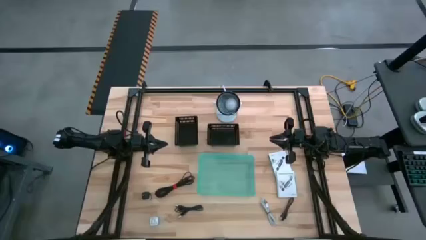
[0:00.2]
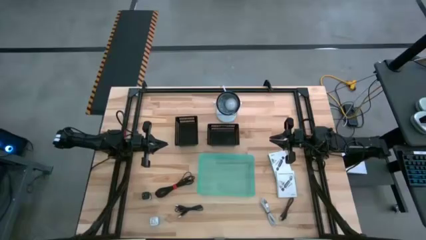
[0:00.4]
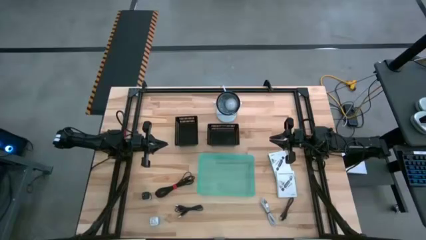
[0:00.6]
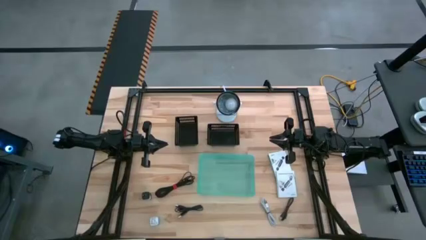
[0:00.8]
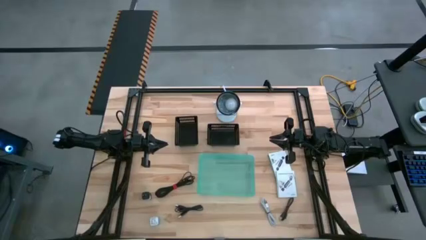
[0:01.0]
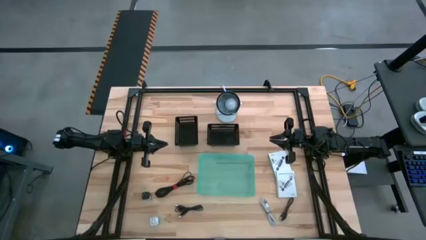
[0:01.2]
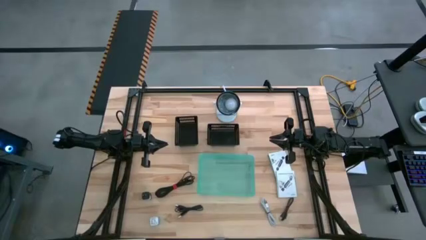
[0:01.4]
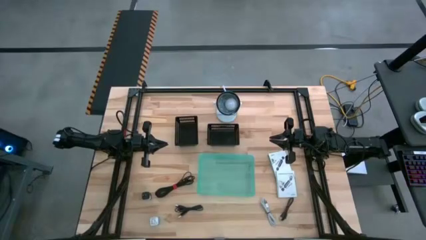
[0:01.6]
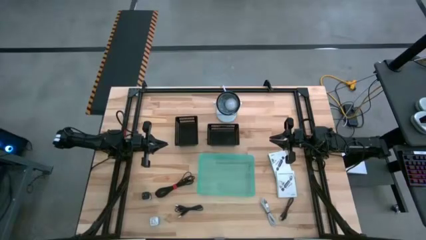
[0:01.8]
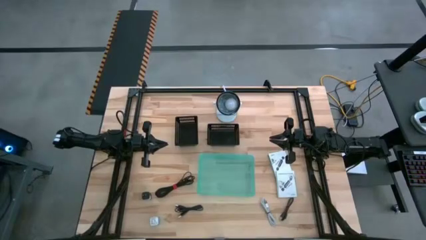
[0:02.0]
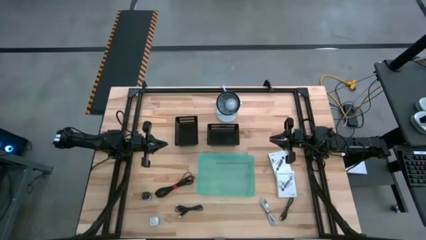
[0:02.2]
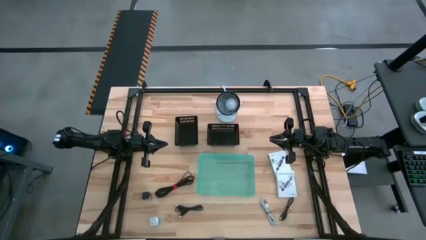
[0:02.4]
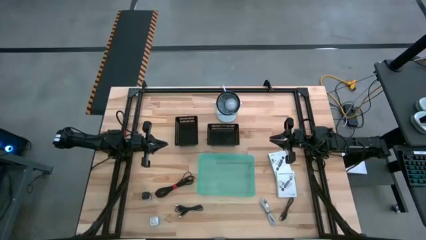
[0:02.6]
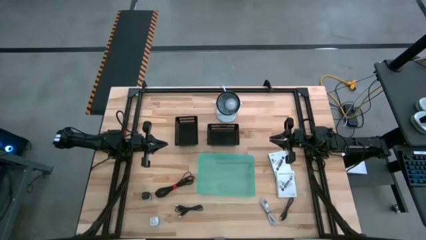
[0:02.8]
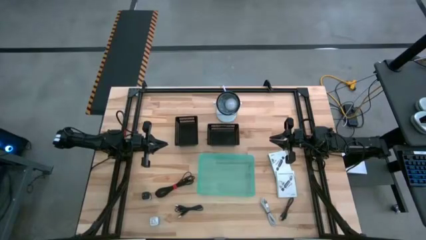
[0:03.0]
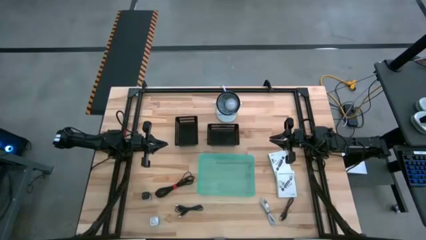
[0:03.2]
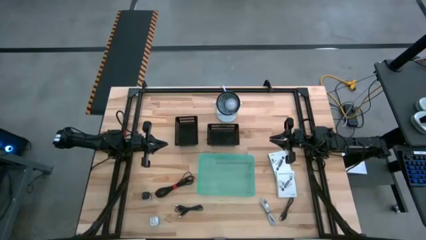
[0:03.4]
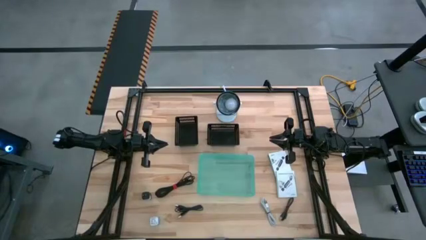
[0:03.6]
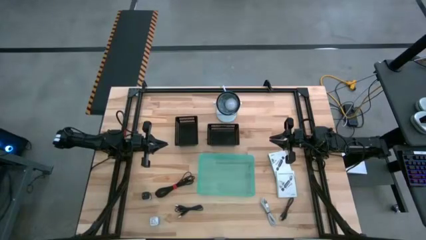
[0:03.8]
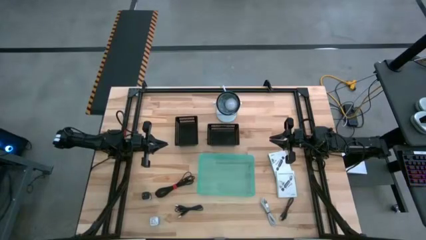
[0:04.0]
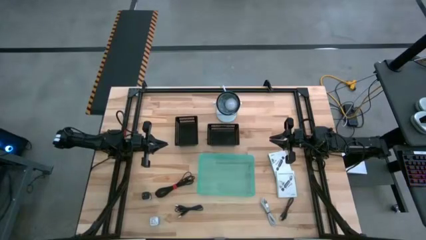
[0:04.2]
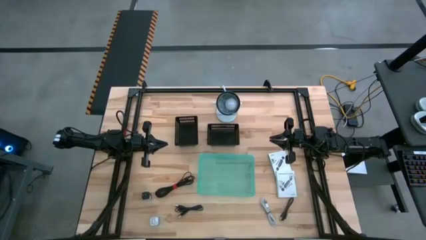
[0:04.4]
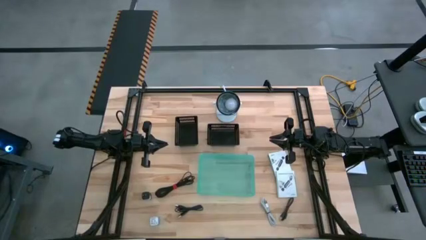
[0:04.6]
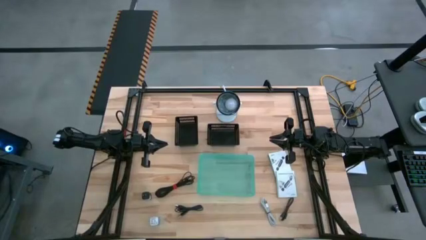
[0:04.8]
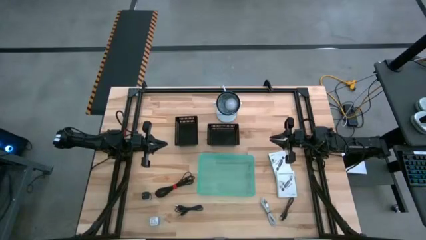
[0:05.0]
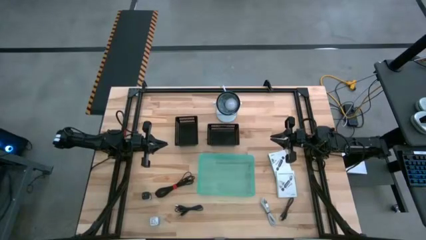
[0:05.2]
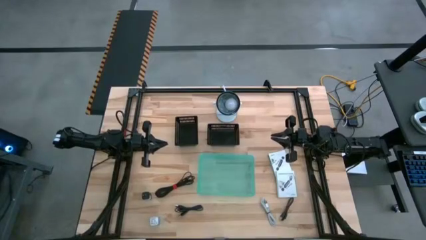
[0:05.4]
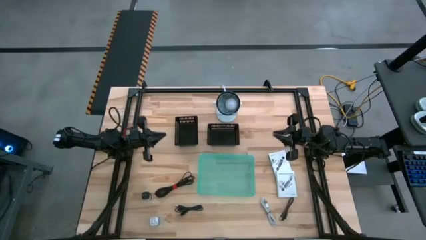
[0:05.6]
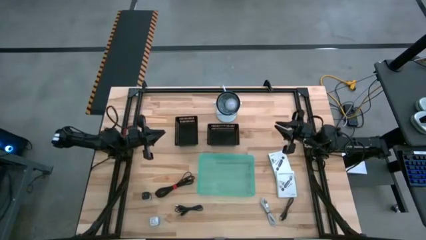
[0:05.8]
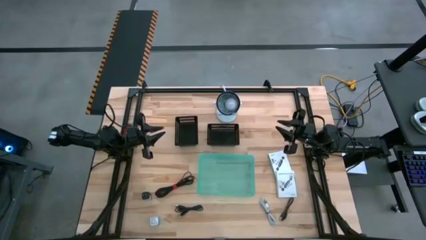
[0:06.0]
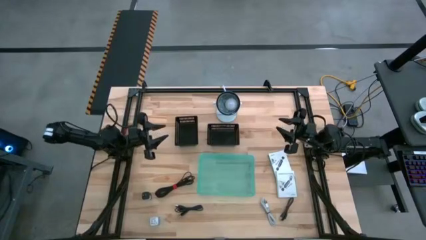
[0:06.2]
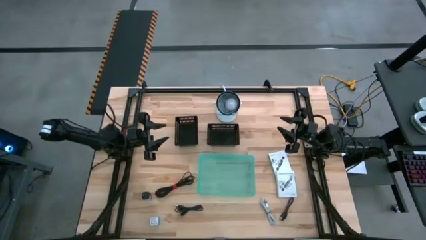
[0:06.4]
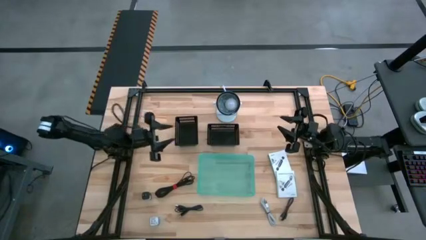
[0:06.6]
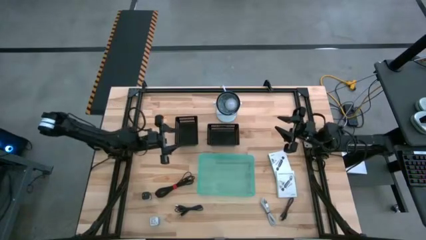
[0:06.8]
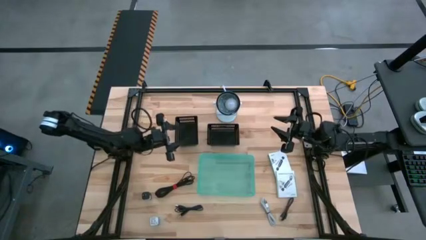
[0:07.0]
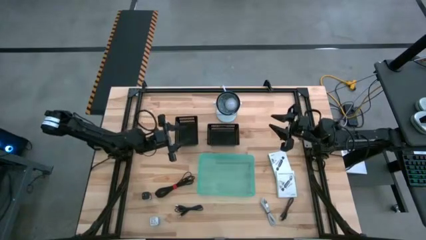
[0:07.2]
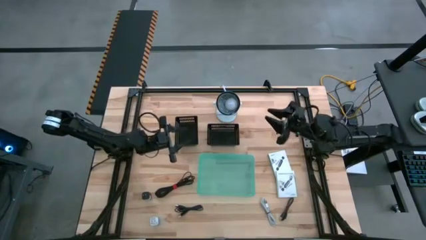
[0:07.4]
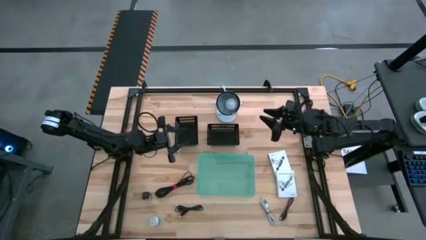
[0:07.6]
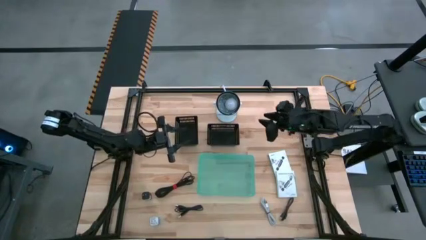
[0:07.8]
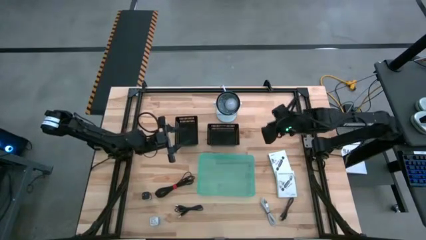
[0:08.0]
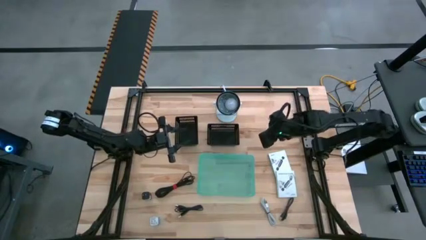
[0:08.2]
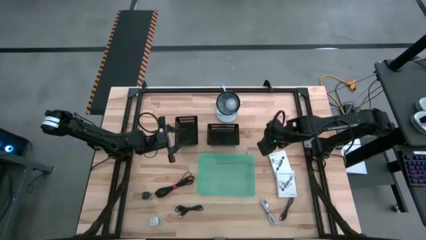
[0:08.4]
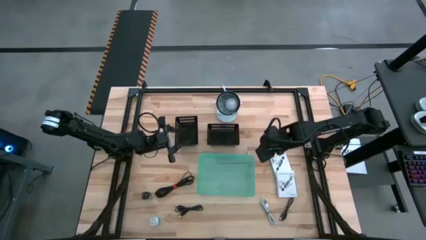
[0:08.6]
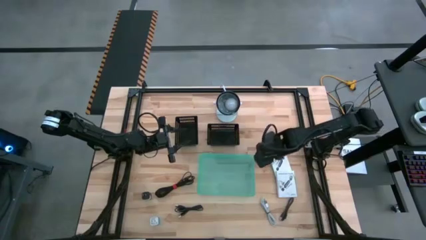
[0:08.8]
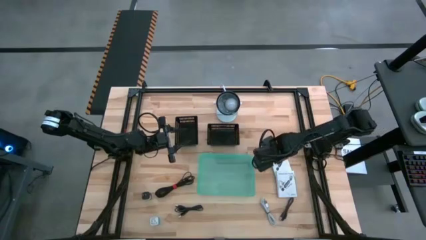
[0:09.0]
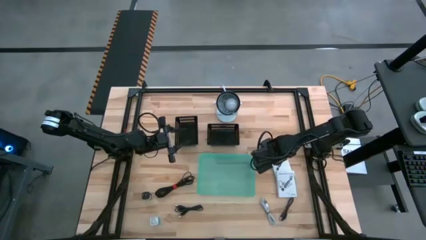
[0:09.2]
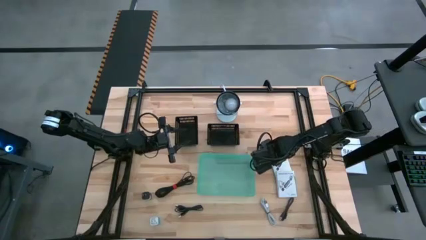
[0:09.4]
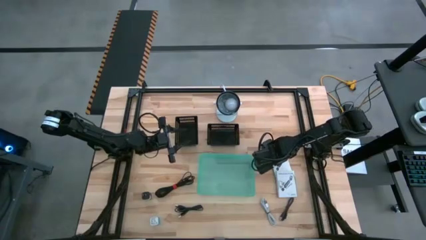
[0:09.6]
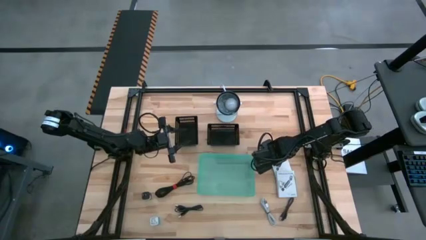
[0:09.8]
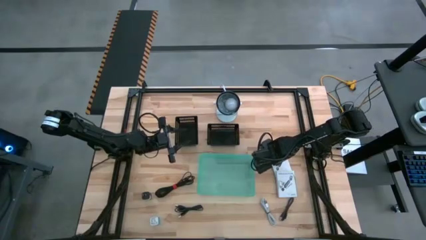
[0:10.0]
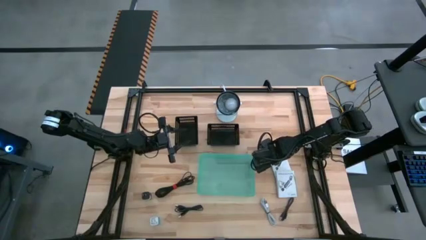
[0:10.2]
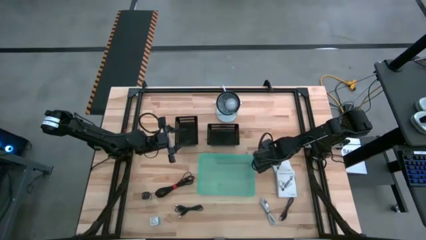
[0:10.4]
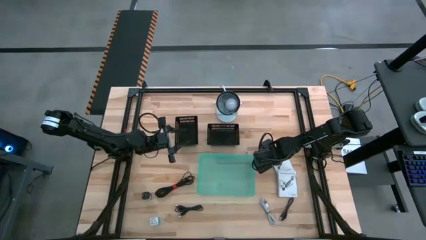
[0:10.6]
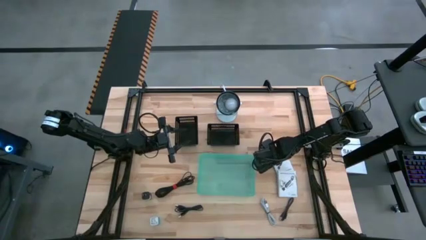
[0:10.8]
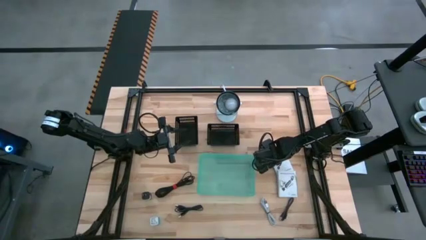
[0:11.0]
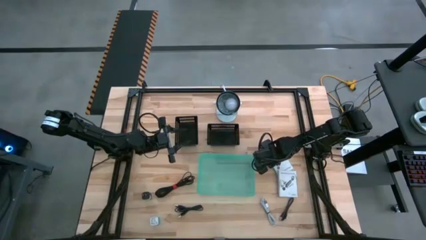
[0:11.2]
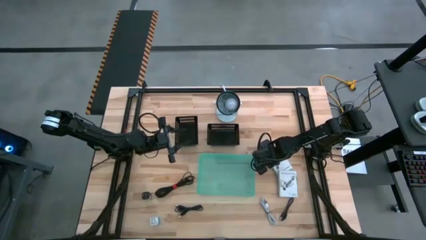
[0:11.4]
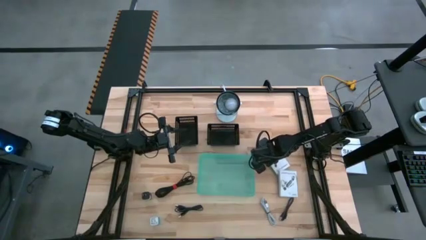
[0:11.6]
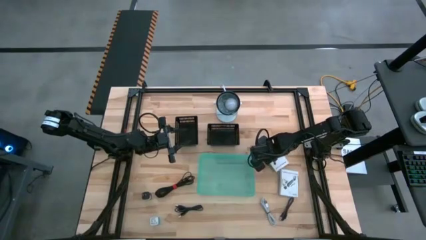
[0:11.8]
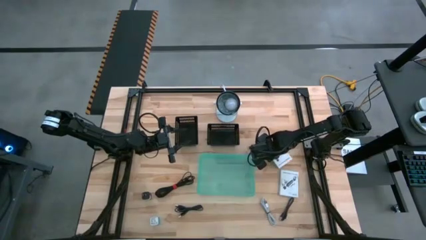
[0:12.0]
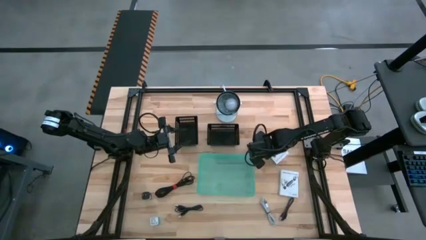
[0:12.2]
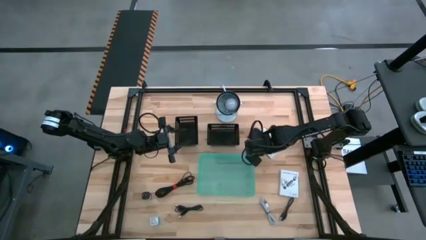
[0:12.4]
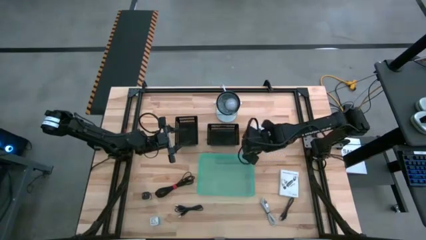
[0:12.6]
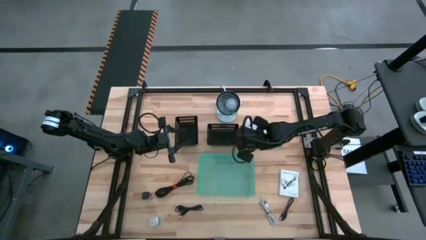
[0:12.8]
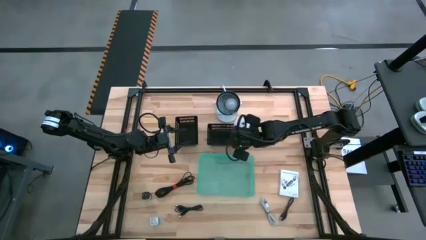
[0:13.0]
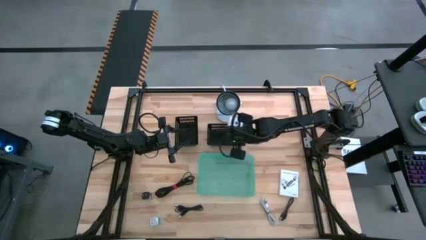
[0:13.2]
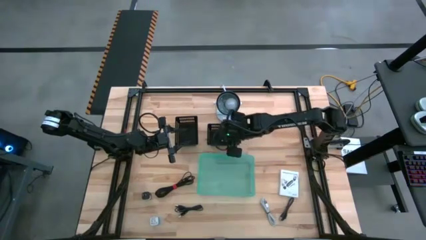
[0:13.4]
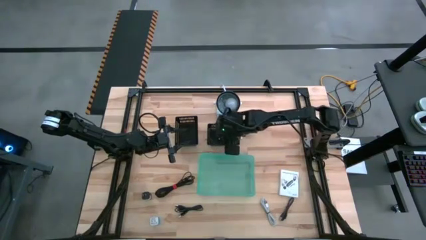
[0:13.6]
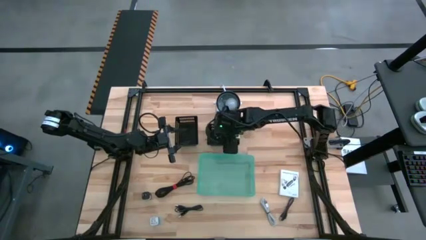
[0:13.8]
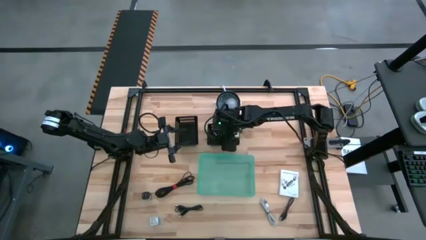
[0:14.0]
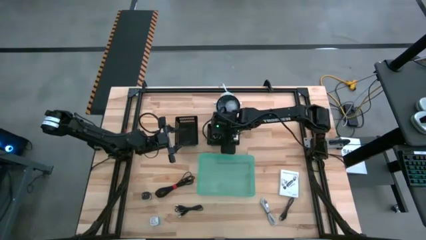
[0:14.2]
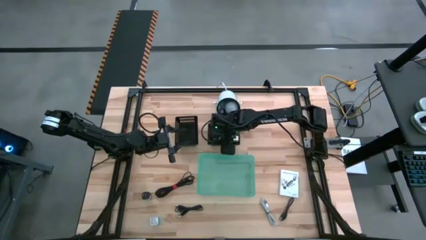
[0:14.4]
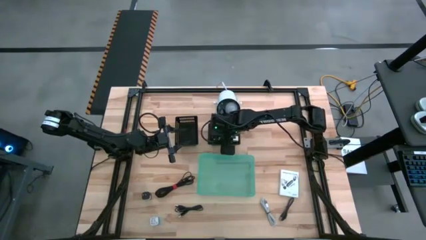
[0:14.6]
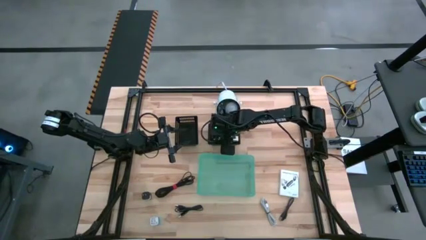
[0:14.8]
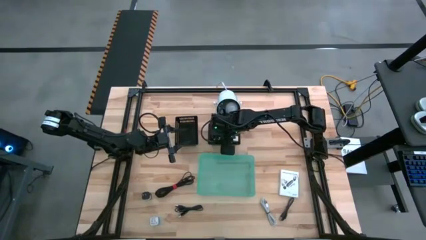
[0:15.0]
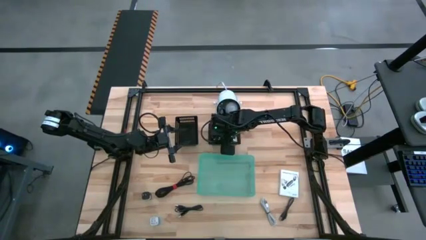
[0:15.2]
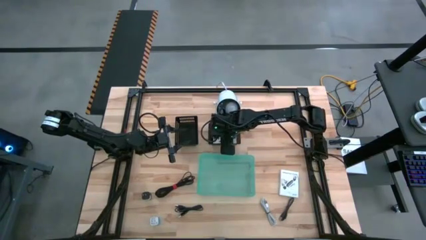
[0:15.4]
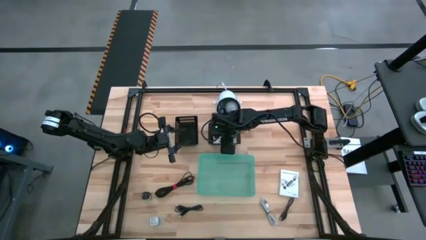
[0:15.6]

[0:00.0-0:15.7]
Task: Pick and place items into bin
Put the top white box into the right black bin
